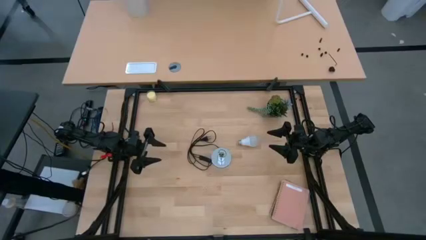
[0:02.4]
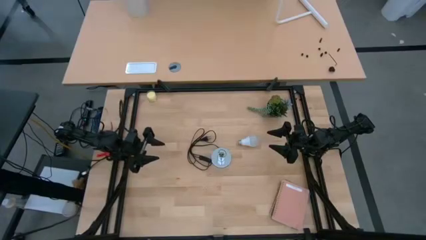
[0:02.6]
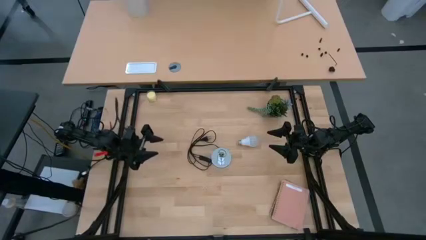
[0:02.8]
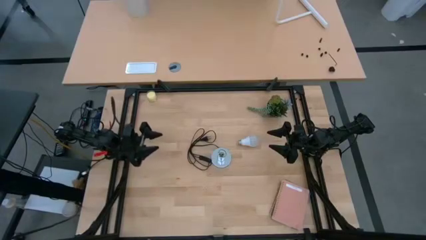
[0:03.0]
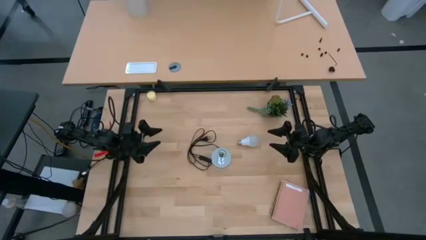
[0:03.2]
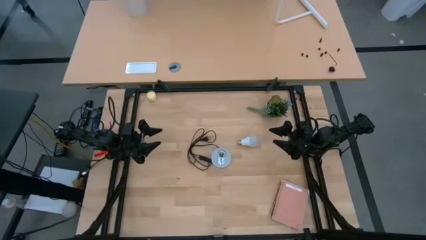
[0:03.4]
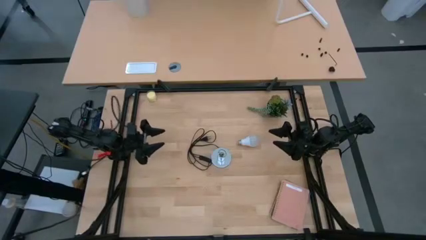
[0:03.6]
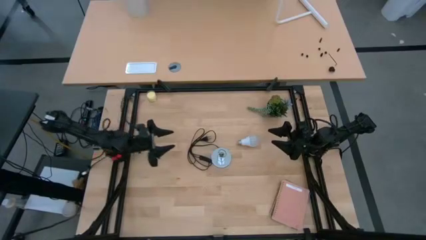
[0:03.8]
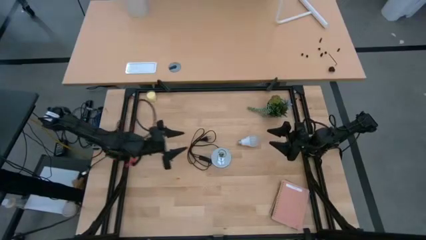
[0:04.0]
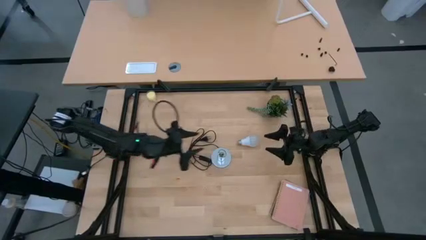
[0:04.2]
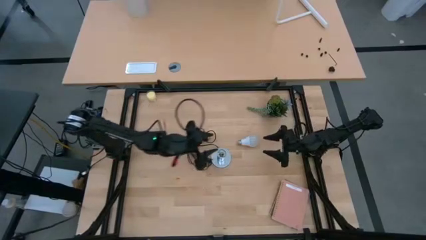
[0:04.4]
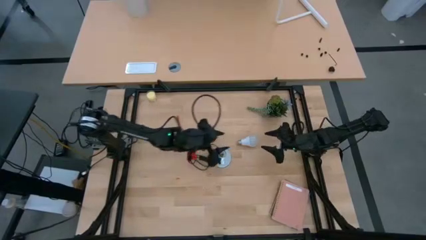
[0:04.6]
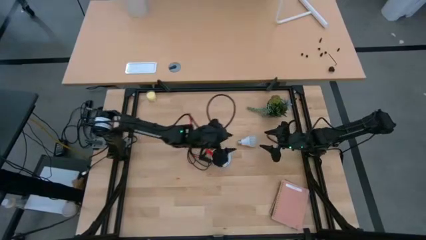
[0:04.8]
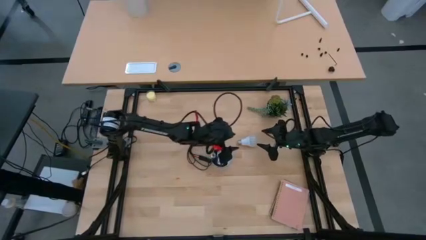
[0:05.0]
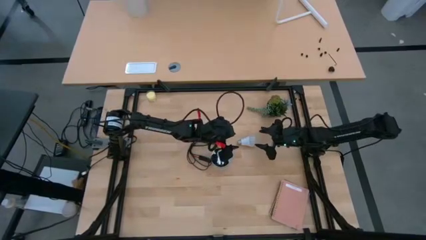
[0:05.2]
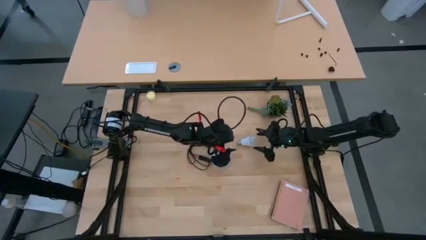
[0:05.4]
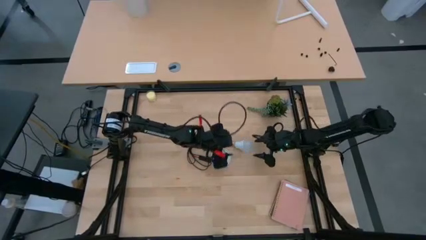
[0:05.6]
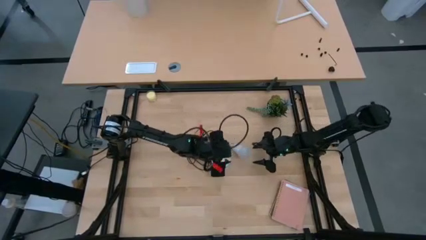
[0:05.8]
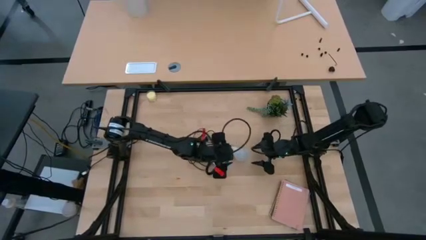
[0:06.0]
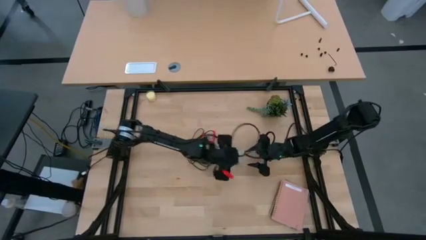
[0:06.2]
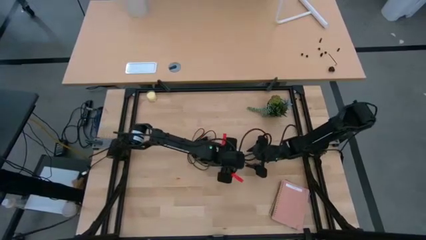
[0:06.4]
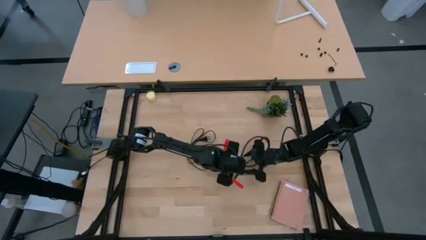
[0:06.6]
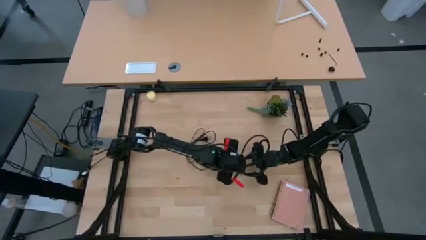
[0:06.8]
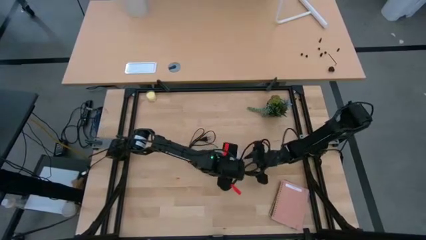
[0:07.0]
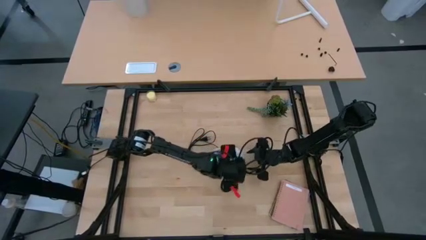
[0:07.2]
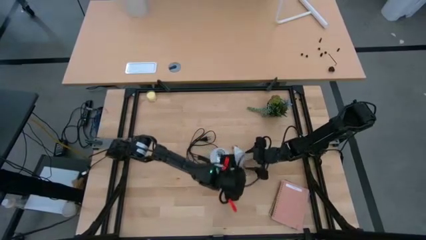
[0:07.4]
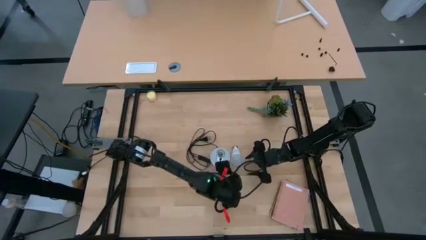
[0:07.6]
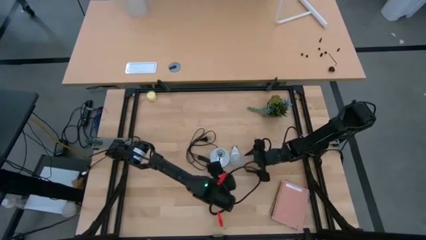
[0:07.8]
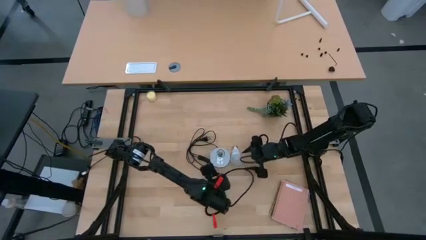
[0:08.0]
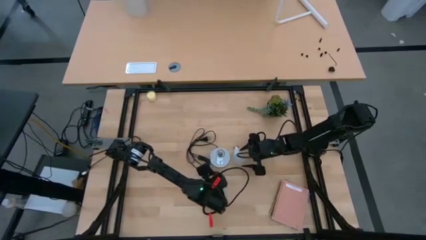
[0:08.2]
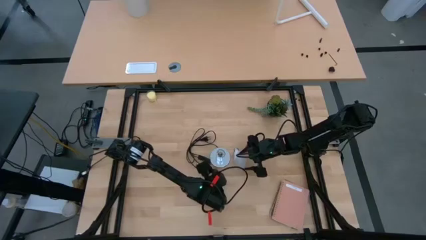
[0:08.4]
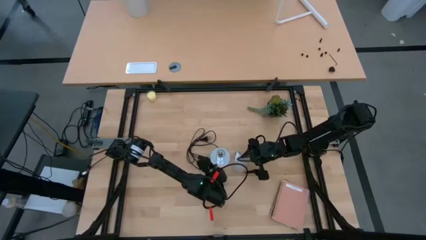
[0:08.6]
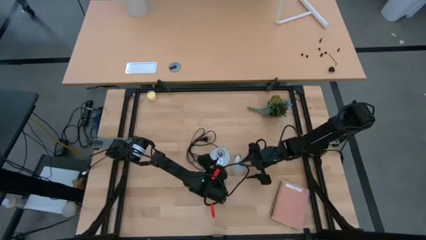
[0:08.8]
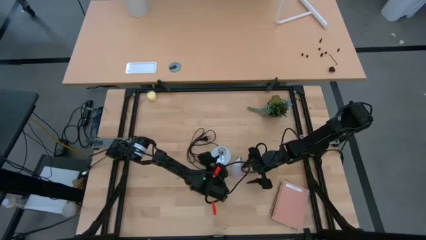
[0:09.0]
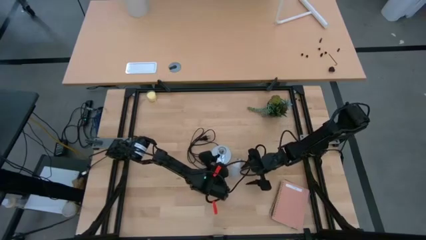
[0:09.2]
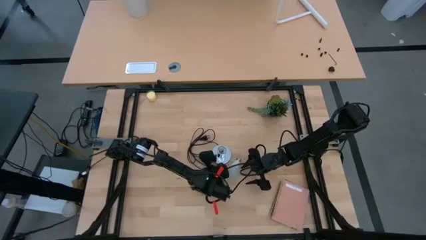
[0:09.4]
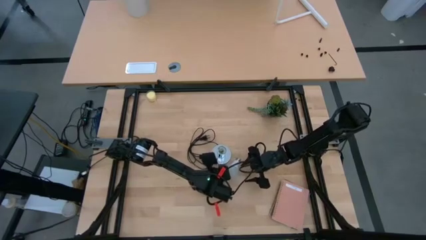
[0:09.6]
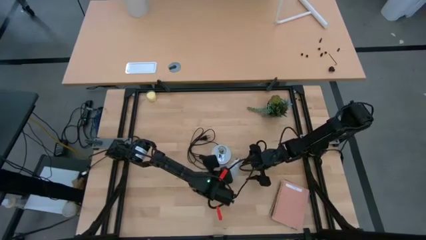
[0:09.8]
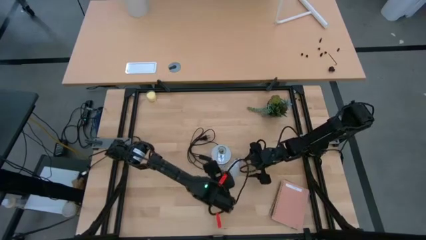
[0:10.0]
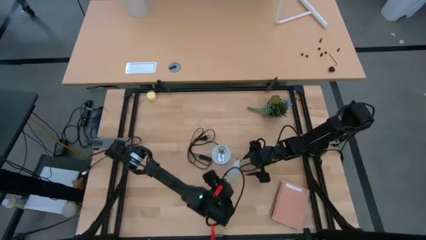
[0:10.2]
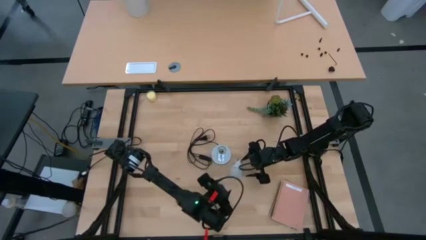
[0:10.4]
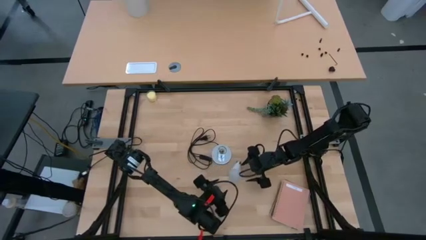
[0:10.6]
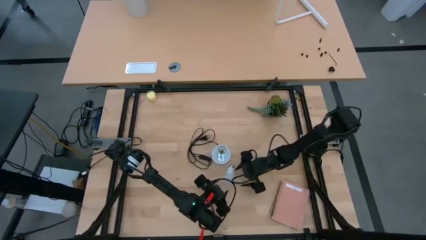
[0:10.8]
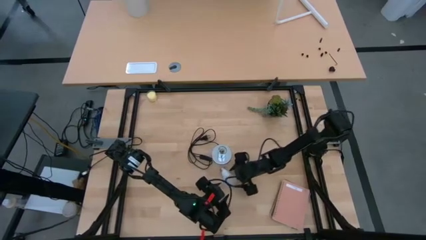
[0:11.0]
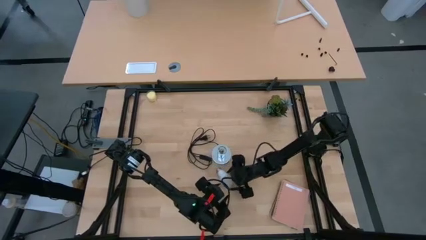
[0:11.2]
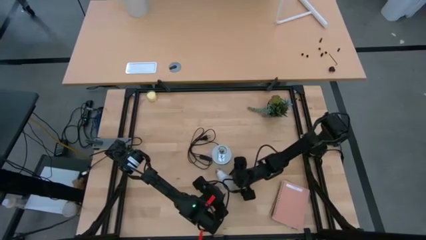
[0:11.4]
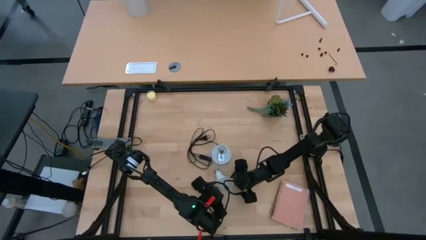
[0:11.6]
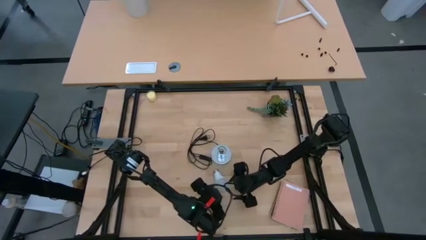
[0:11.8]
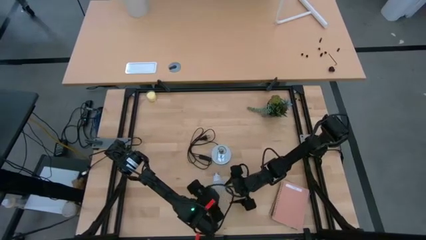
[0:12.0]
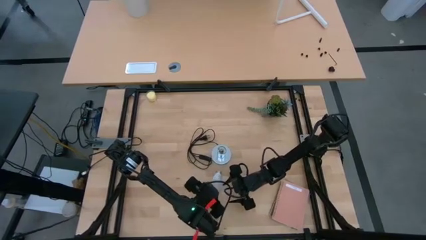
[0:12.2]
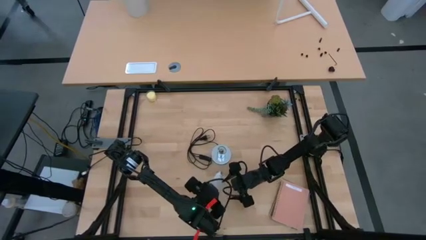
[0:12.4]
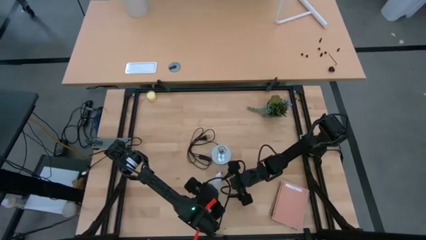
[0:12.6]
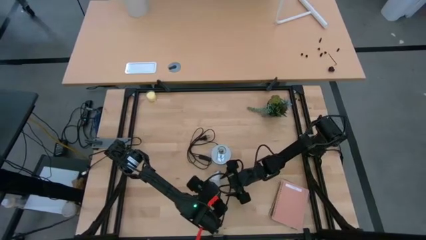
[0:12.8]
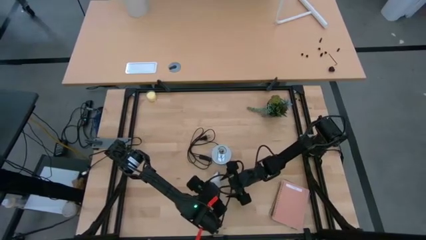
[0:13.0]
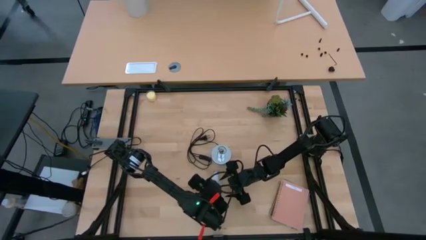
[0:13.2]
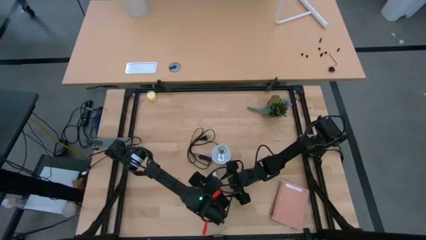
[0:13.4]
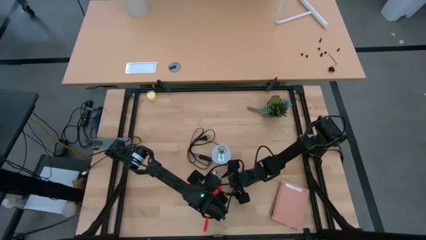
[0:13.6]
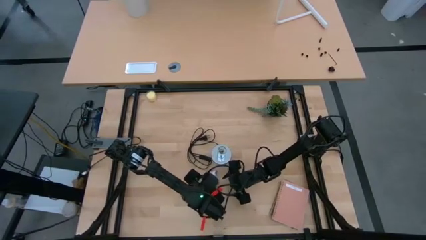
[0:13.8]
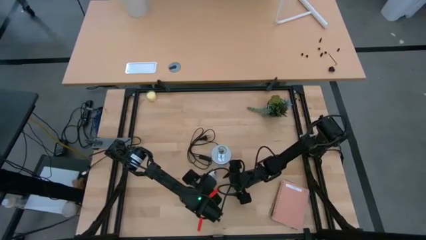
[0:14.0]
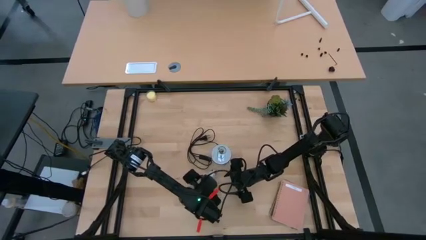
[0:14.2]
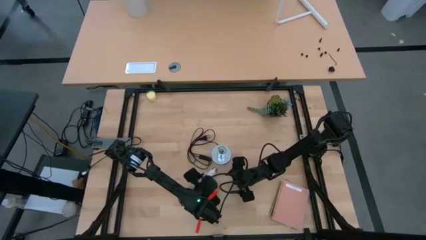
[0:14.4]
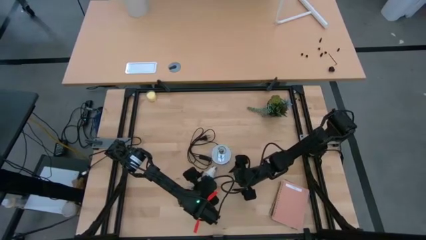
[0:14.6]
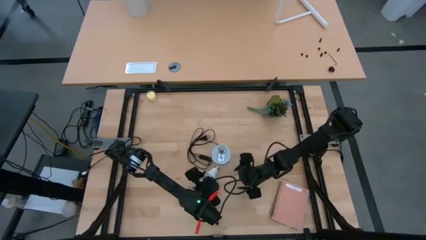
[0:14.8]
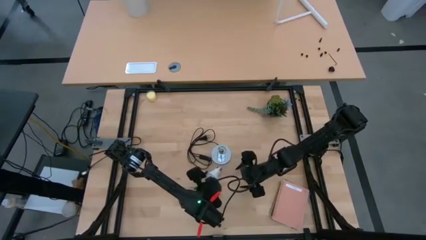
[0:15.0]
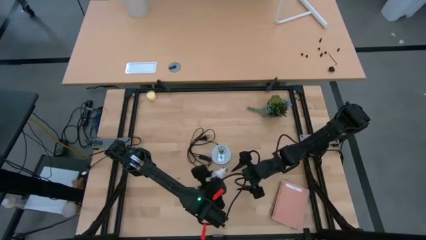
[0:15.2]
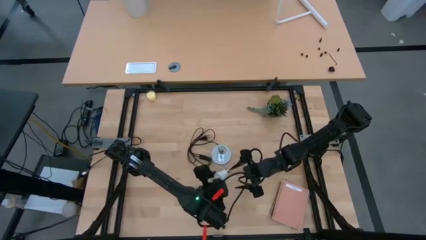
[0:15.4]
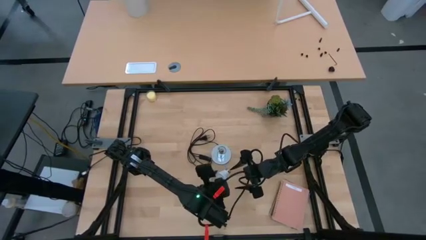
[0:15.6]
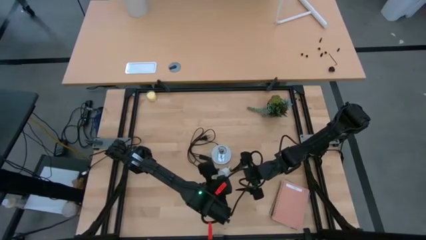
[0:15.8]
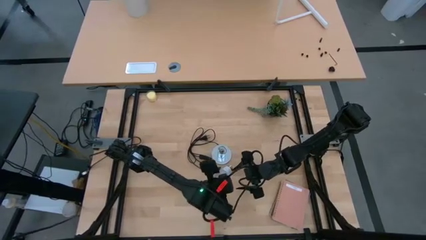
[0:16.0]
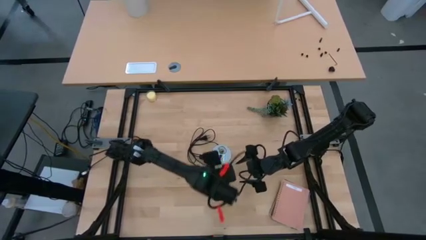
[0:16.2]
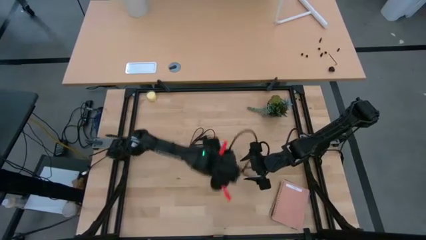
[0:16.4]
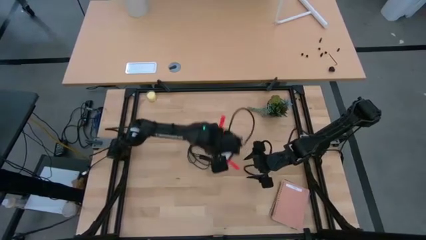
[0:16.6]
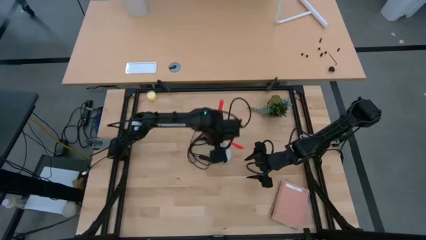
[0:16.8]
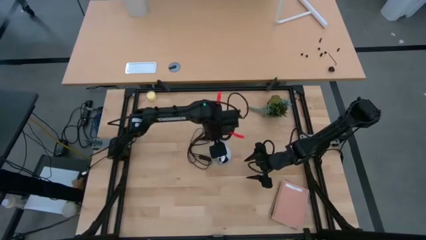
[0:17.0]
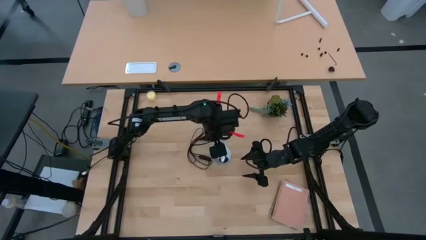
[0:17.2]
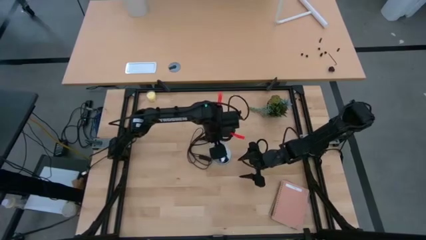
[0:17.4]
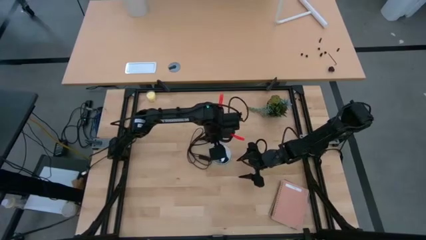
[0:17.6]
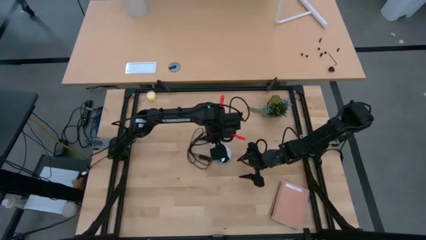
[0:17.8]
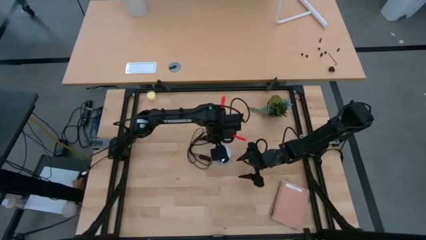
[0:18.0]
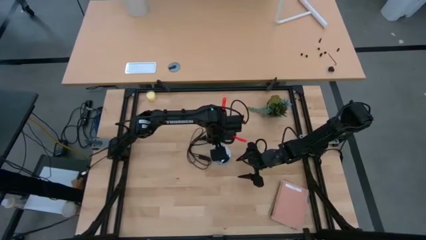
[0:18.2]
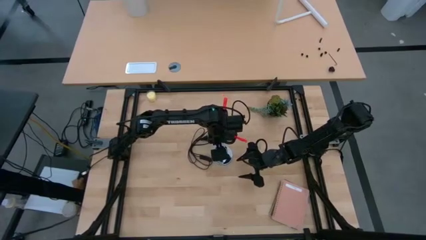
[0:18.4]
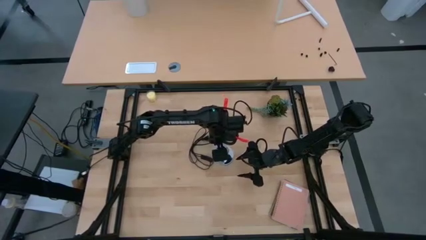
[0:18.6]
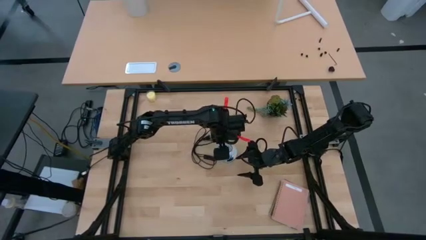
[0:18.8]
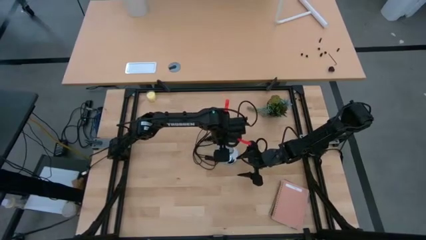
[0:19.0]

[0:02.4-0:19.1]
Task: Screw lightbulb
Insert the white lightbulb into the metallic lamp
